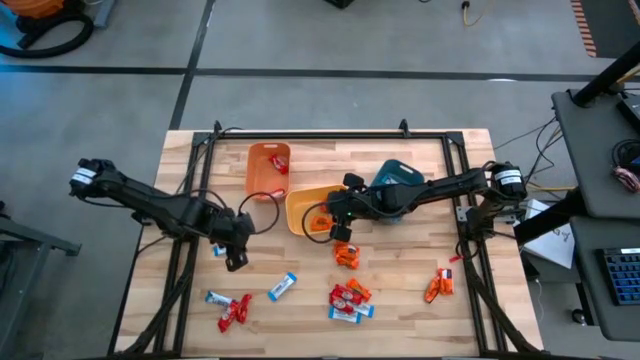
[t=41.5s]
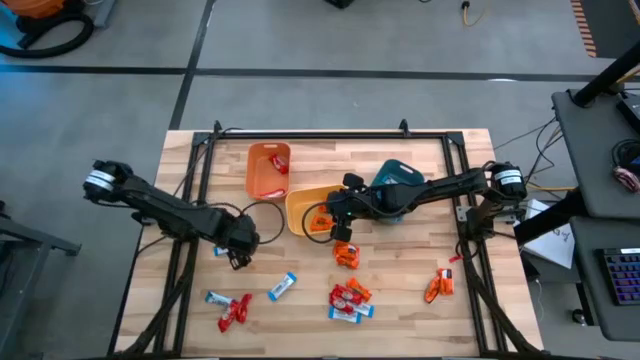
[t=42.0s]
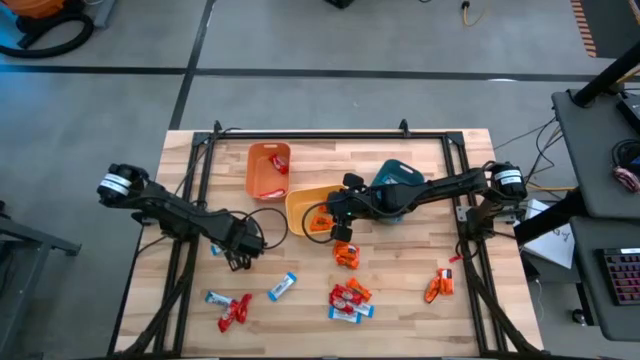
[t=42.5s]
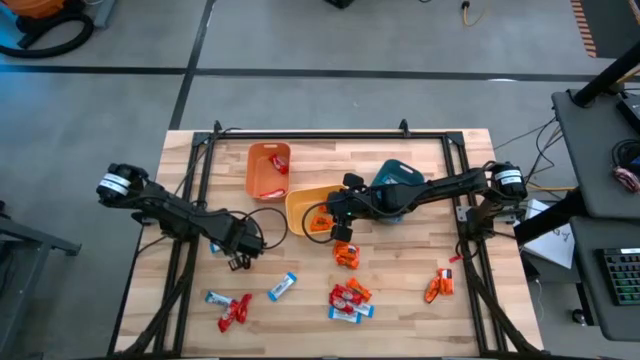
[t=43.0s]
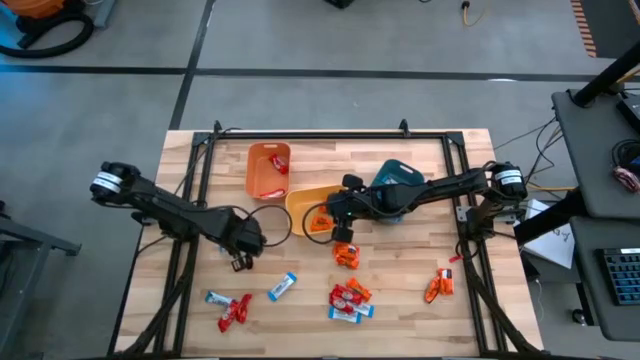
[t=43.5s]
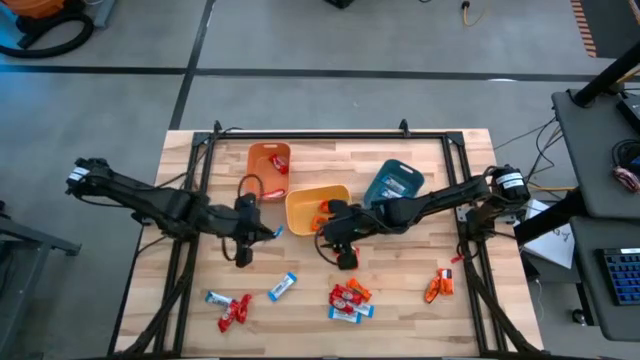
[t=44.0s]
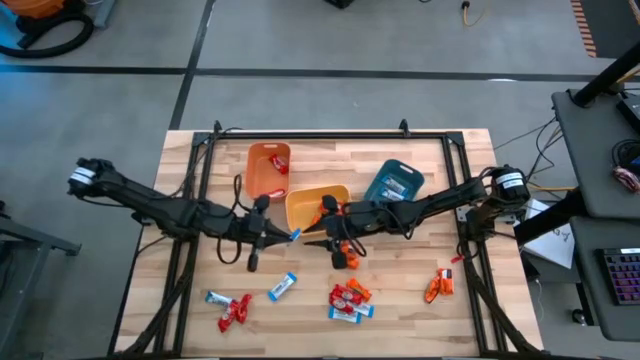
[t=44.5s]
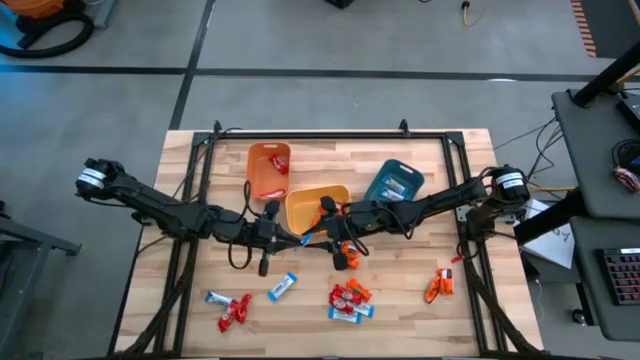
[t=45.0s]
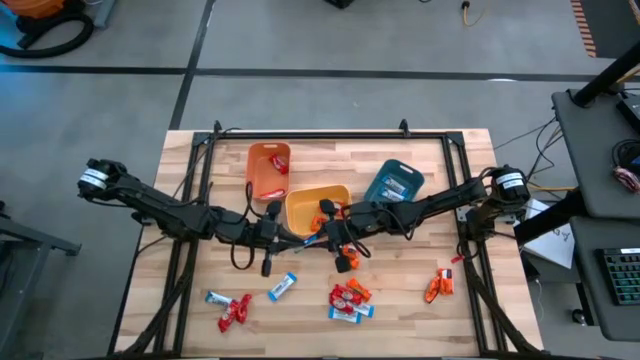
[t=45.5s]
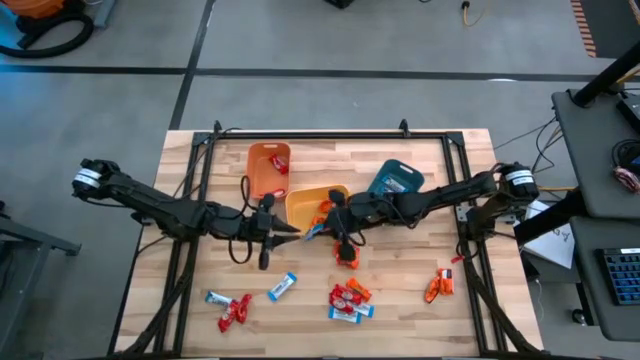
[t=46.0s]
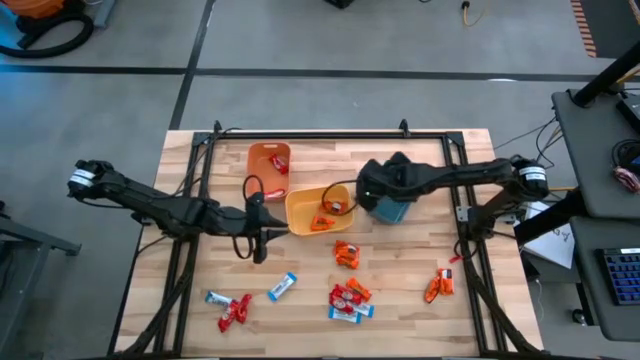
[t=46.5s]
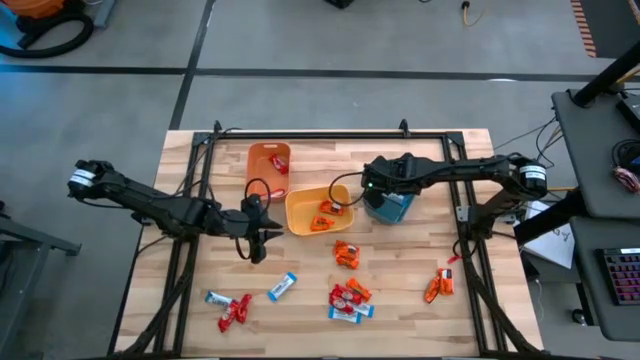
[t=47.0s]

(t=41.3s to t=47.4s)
Task: Sort candy
Put the white chocolate into the blue bin

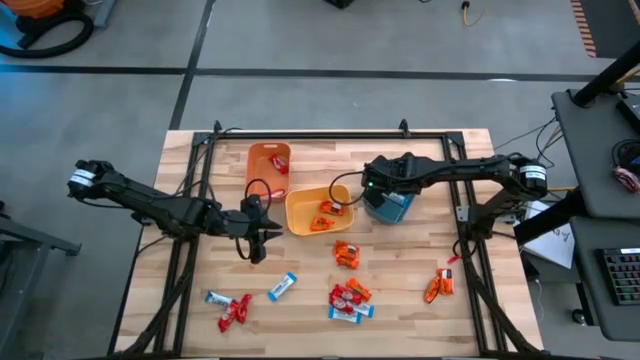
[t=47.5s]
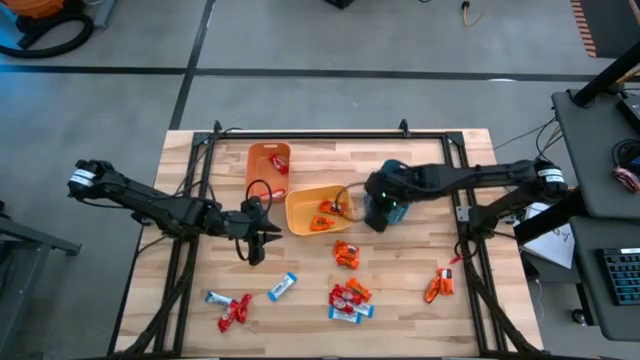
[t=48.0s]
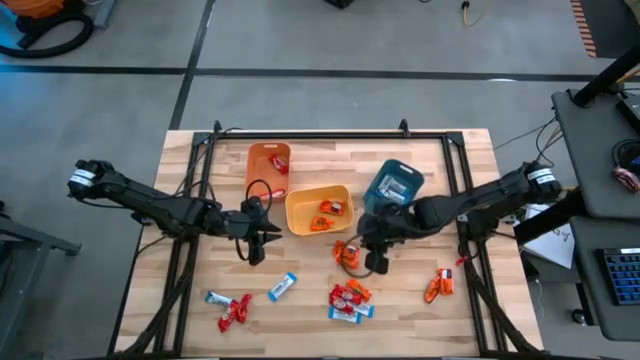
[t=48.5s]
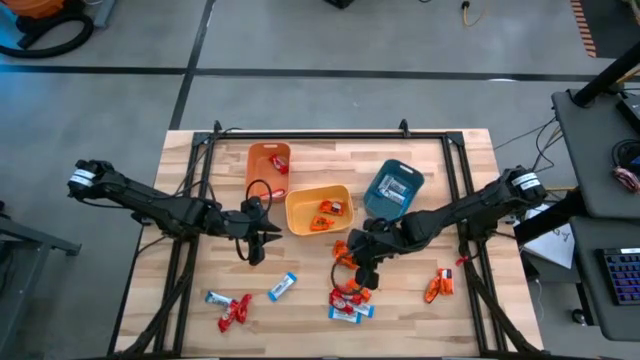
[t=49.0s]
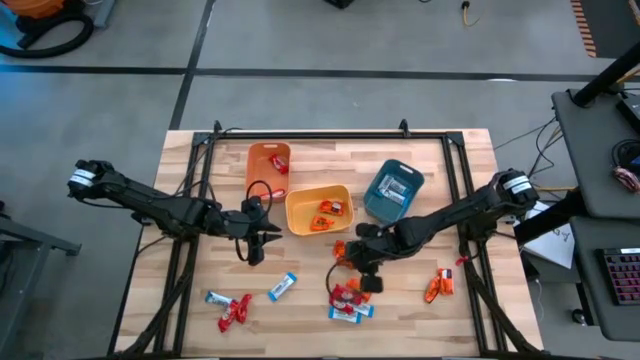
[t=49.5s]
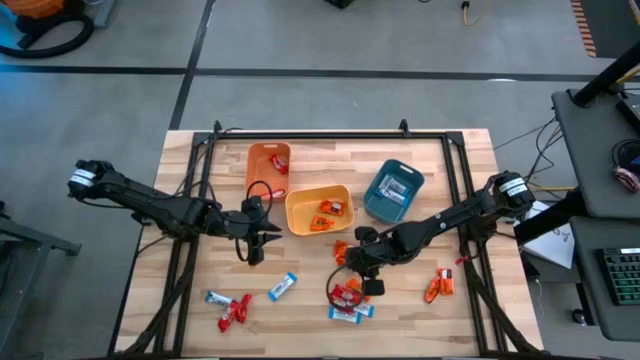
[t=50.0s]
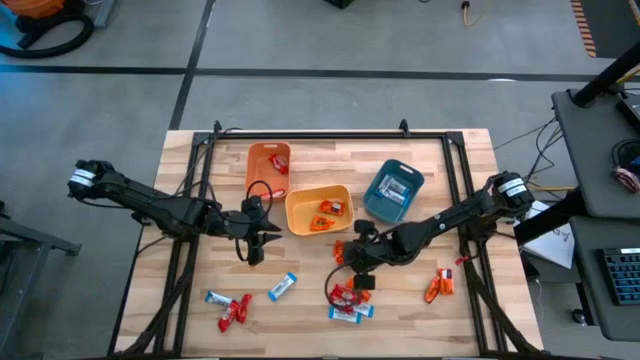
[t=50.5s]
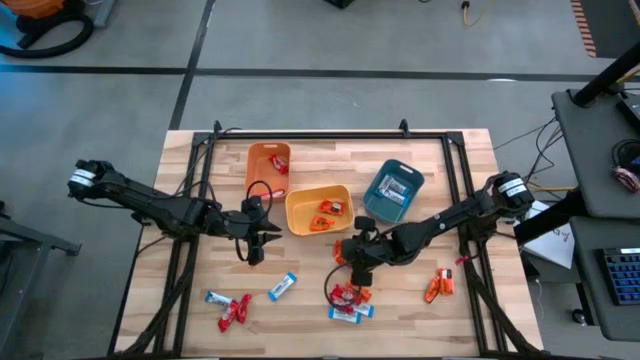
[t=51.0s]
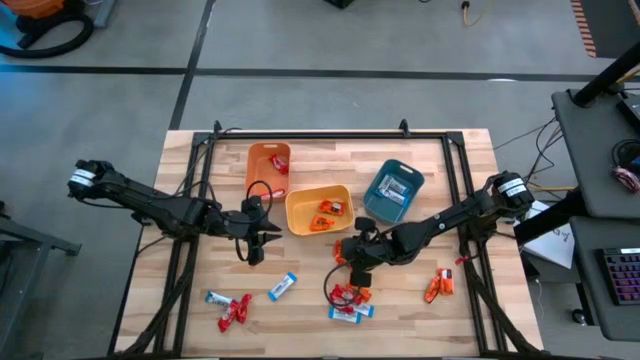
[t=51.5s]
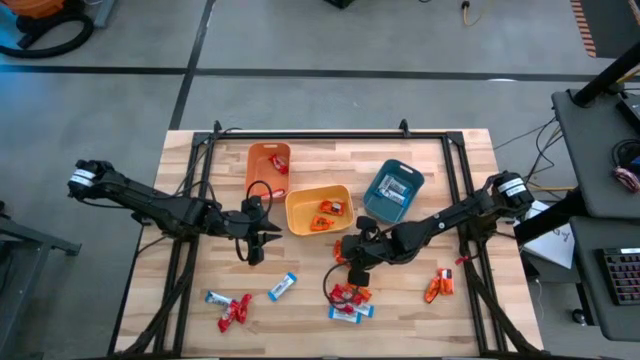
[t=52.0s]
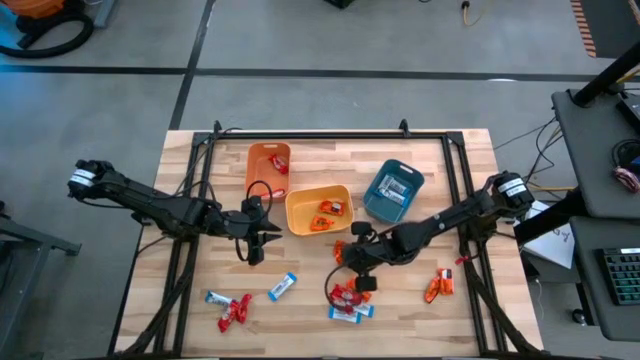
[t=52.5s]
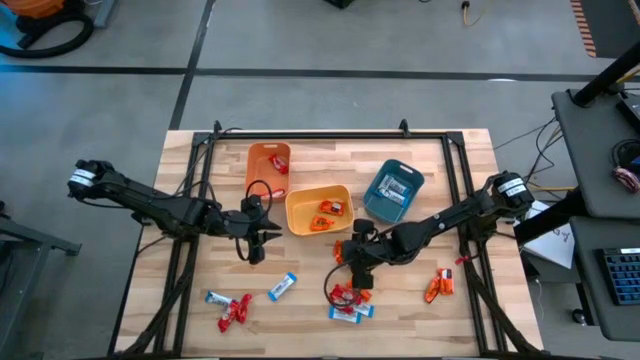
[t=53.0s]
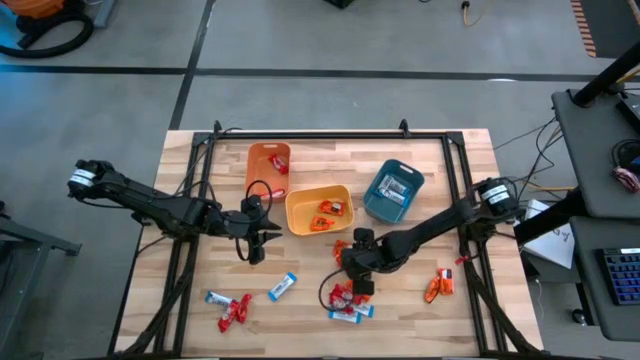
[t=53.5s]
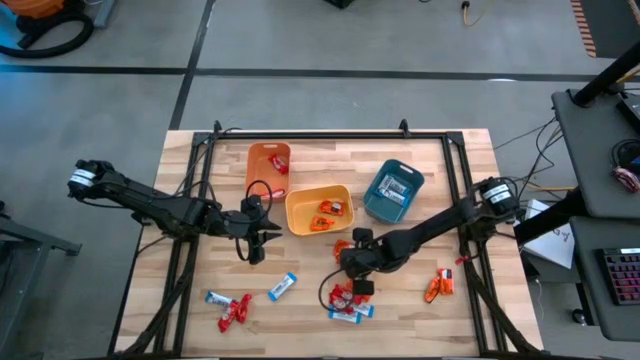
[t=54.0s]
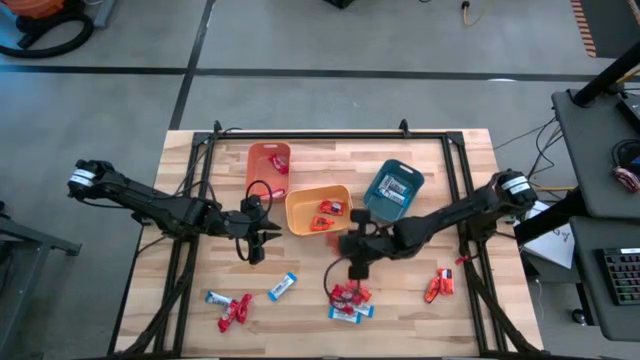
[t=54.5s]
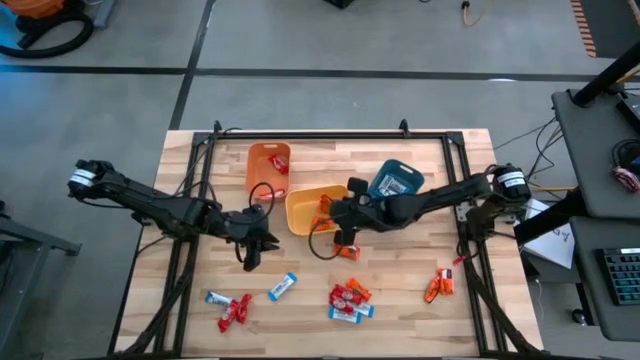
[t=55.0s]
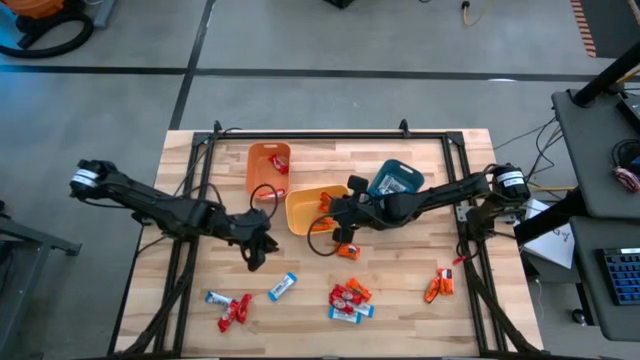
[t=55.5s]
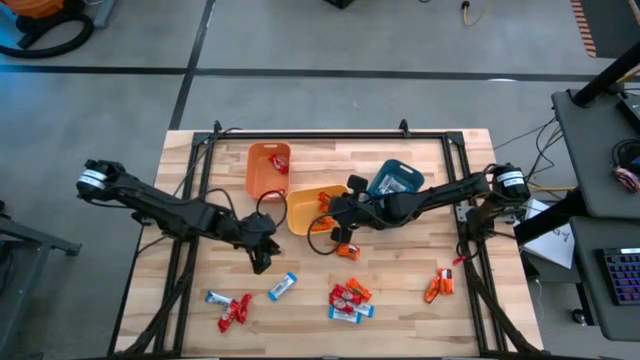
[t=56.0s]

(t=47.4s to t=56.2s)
Put the orange chocolate into the yellow bin

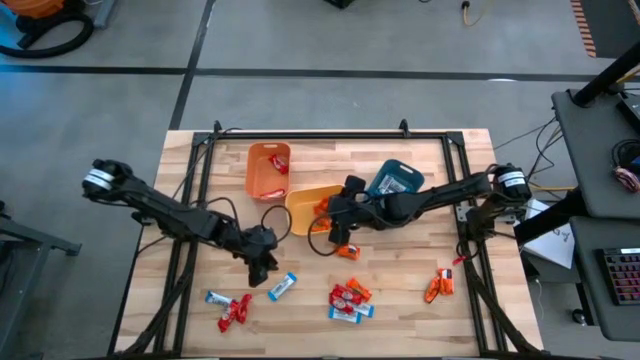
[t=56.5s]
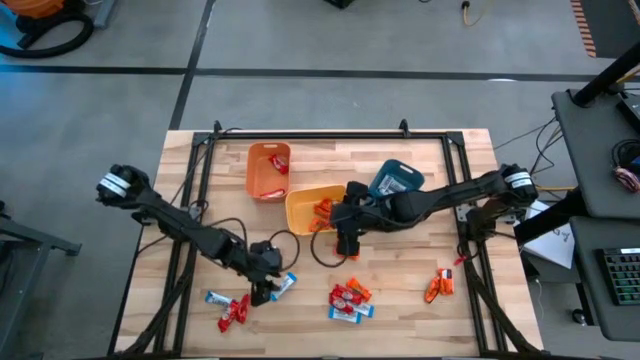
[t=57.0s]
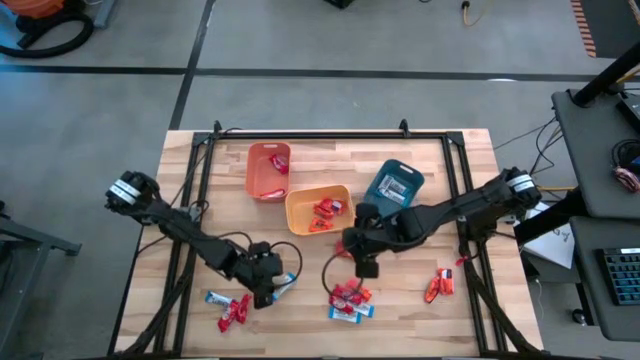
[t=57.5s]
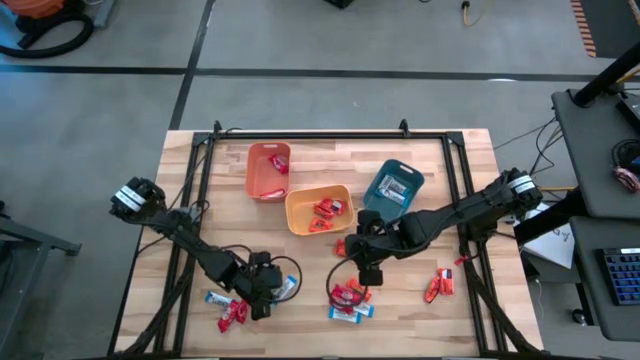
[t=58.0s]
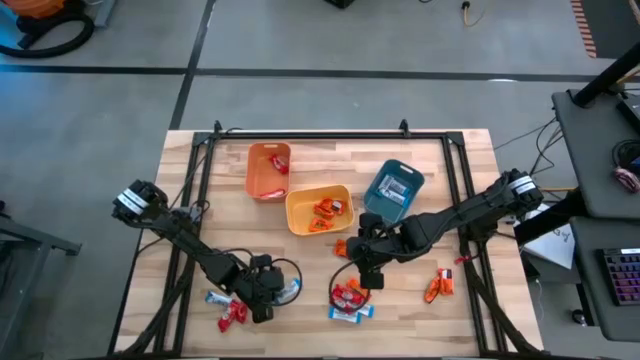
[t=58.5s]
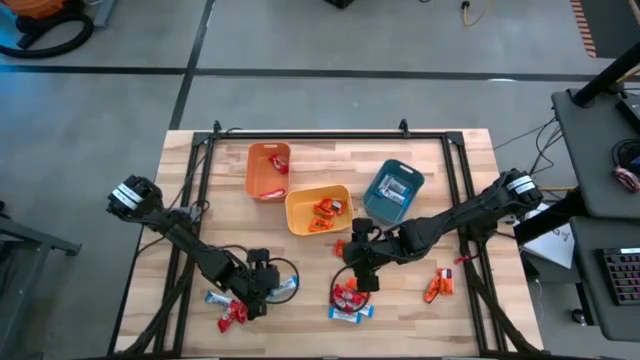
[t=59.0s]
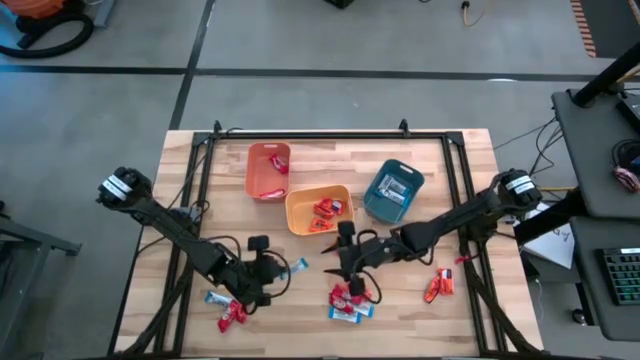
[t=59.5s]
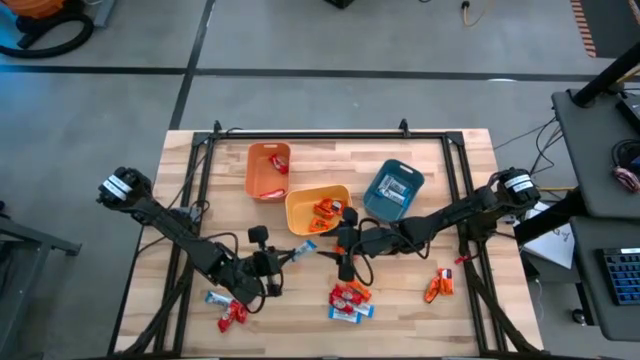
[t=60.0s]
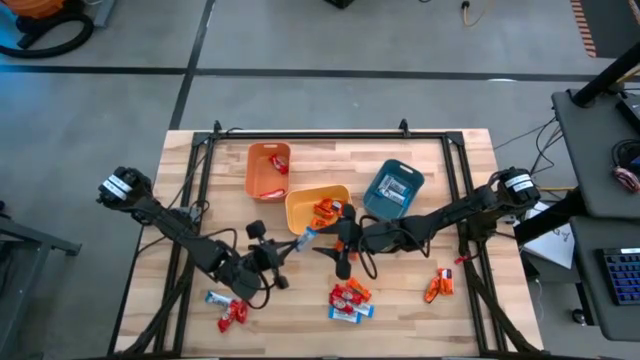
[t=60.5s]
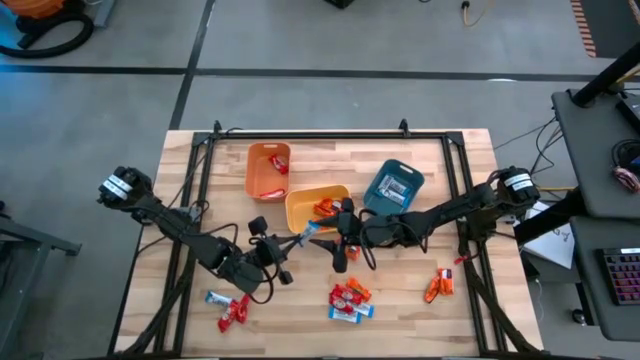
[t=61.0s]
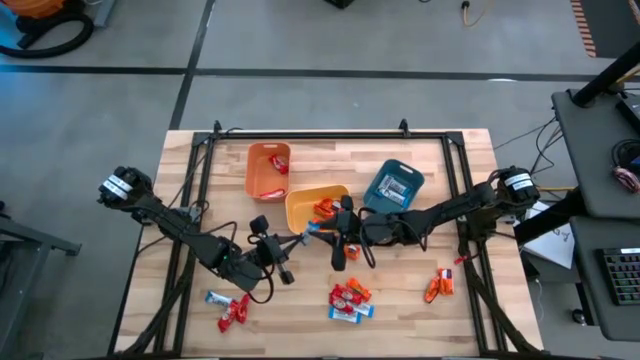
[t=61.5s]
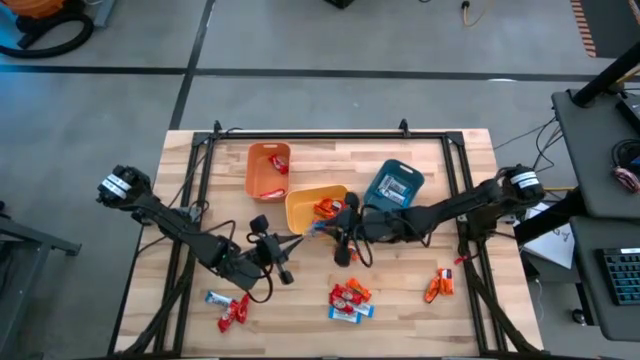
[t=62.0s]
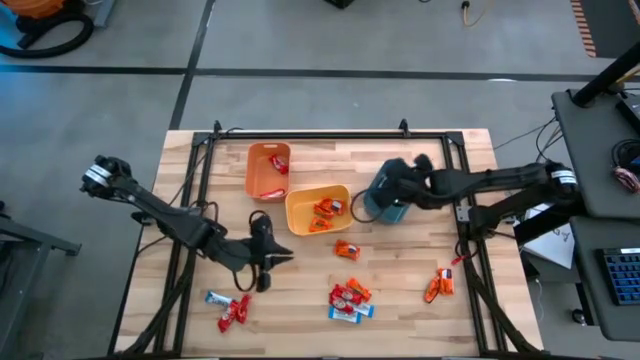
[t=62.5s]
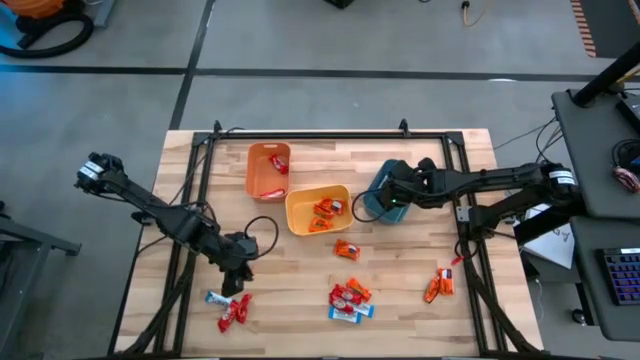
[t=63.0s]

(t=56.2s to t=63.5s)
Put the white chocolate into the blue bin
